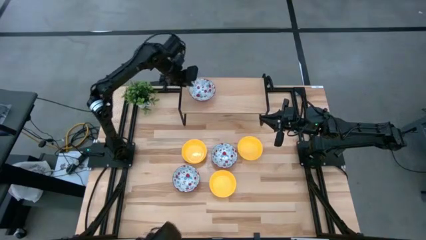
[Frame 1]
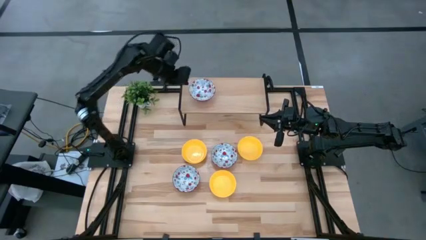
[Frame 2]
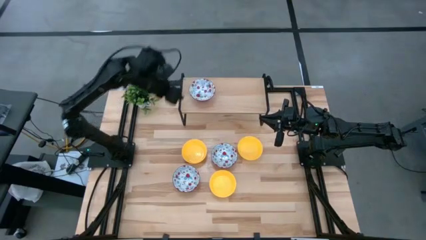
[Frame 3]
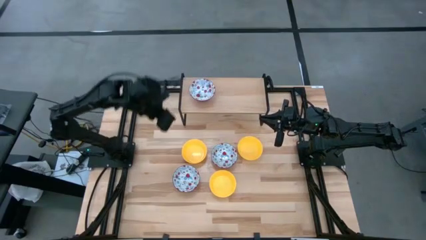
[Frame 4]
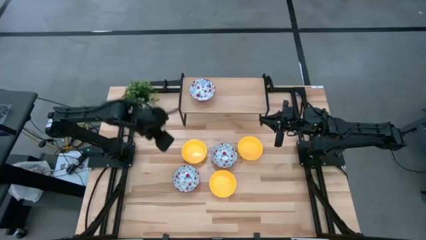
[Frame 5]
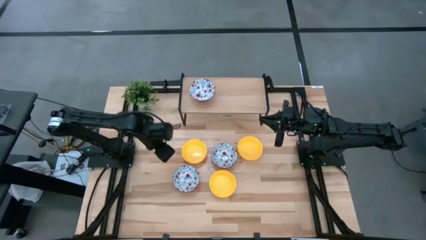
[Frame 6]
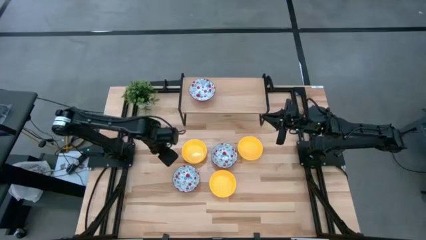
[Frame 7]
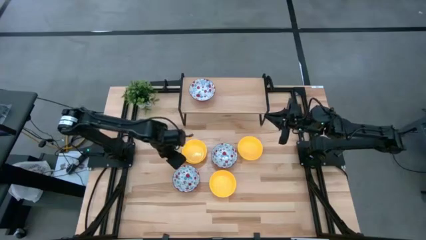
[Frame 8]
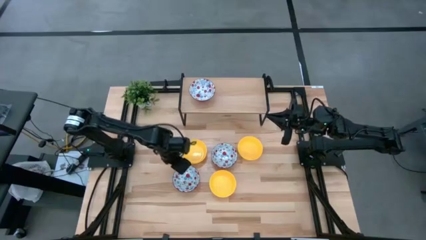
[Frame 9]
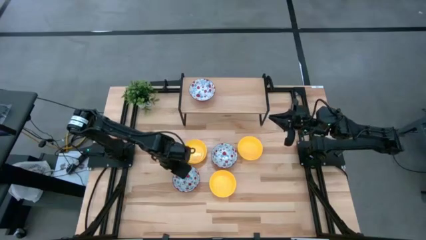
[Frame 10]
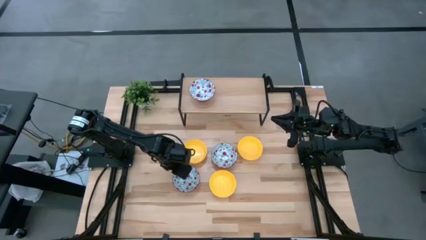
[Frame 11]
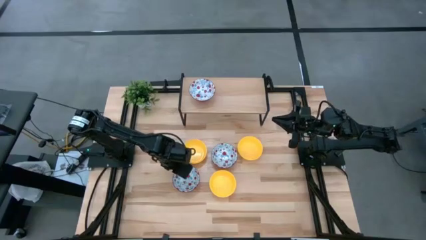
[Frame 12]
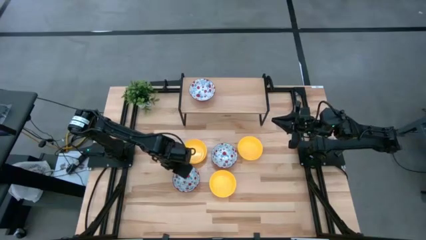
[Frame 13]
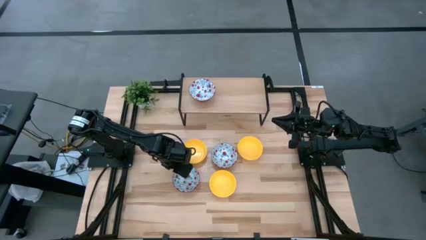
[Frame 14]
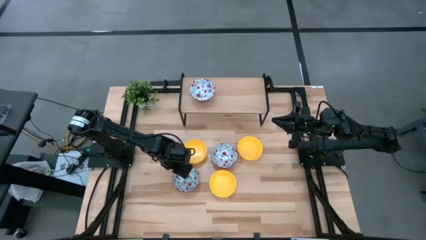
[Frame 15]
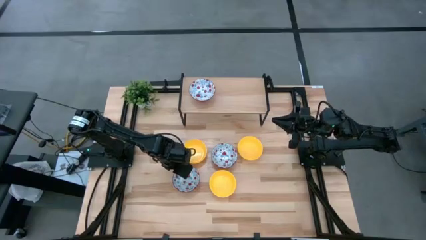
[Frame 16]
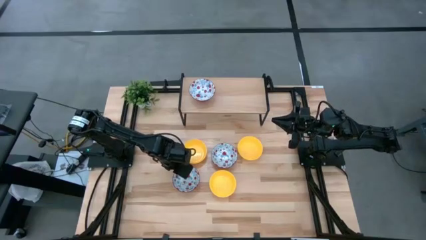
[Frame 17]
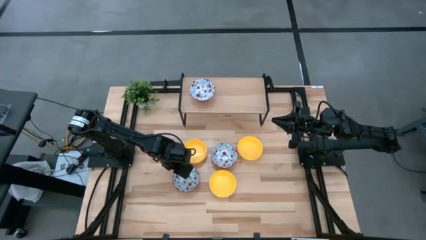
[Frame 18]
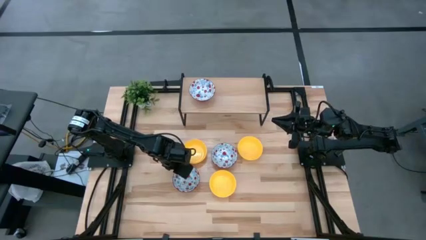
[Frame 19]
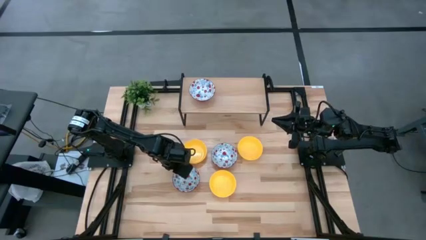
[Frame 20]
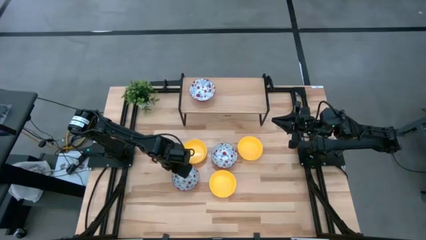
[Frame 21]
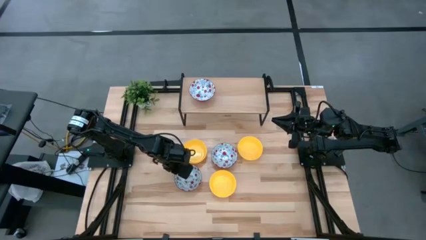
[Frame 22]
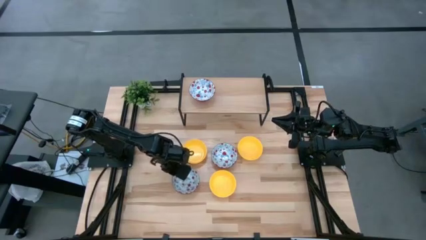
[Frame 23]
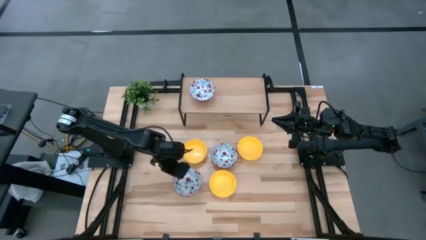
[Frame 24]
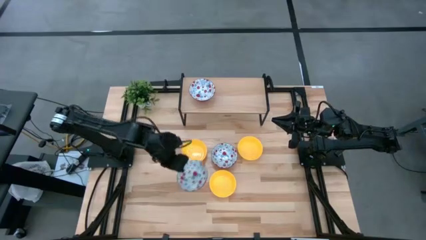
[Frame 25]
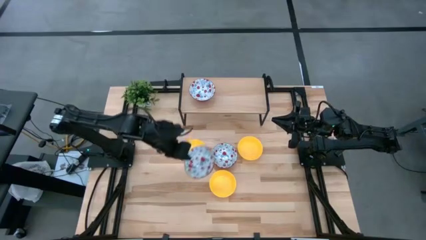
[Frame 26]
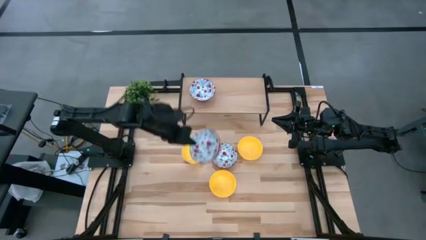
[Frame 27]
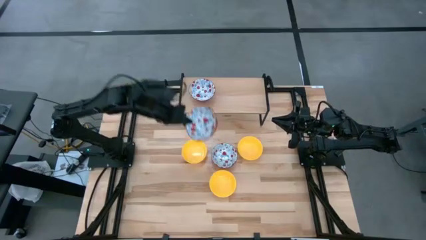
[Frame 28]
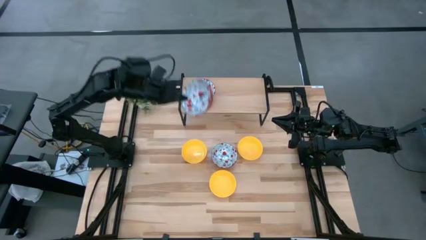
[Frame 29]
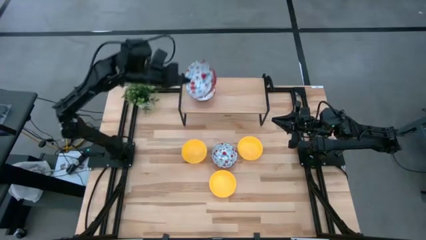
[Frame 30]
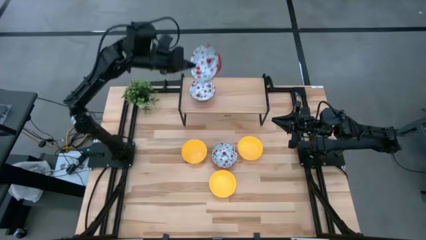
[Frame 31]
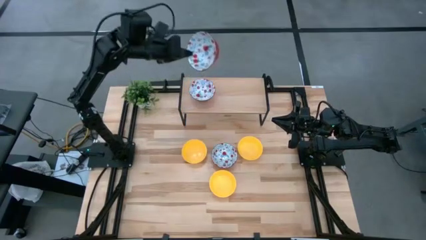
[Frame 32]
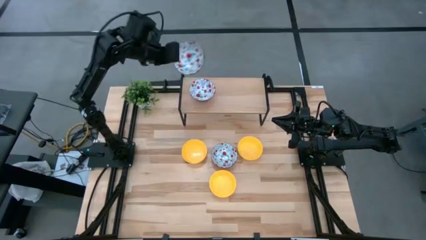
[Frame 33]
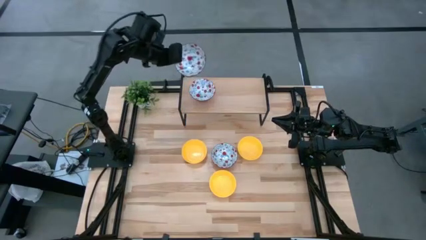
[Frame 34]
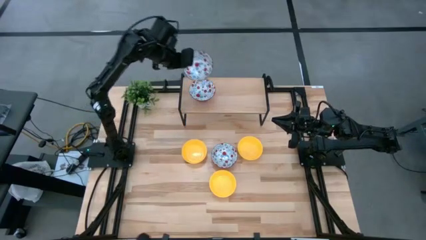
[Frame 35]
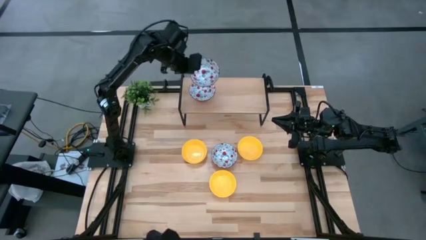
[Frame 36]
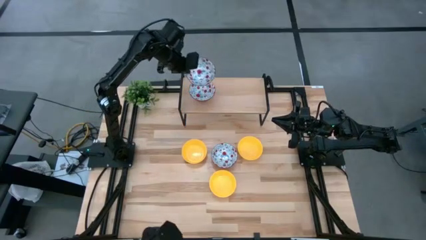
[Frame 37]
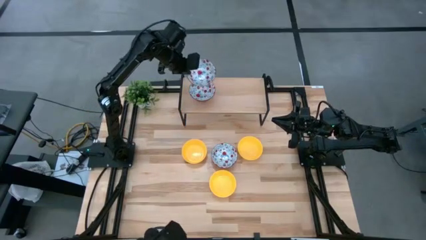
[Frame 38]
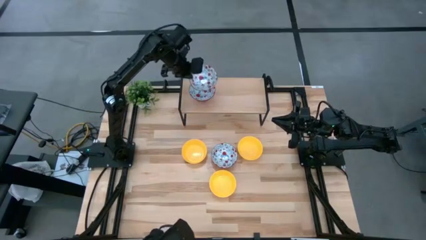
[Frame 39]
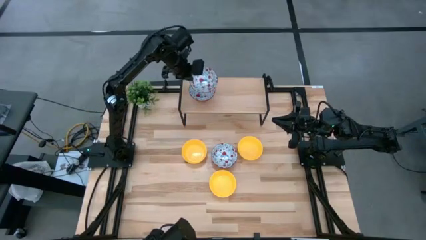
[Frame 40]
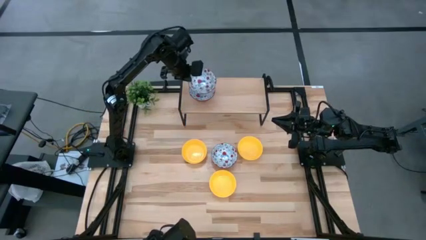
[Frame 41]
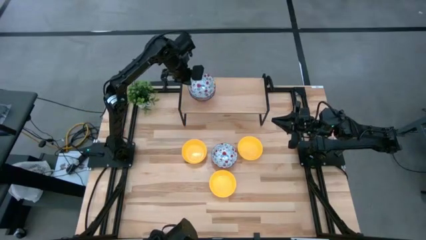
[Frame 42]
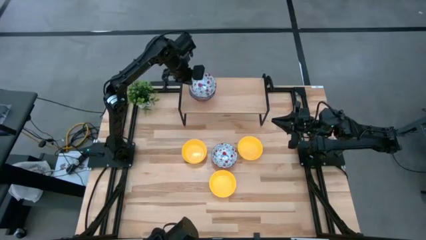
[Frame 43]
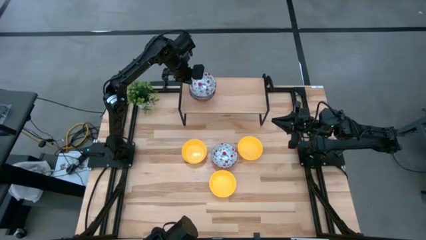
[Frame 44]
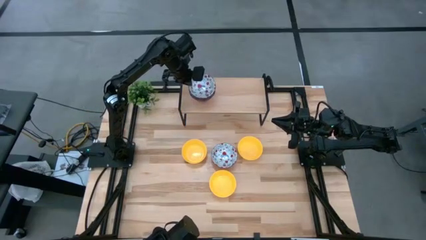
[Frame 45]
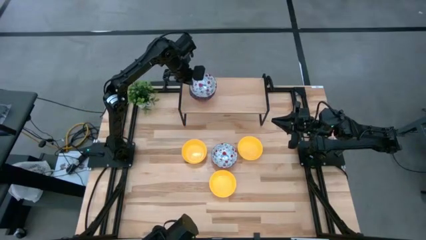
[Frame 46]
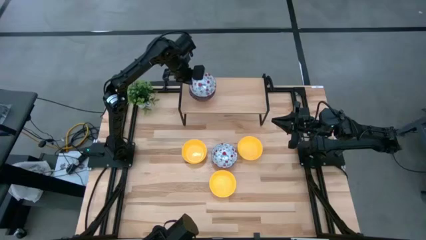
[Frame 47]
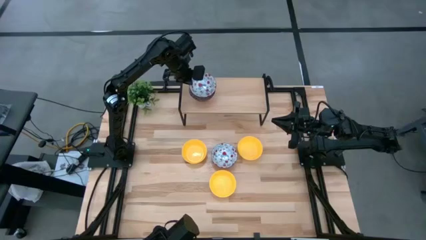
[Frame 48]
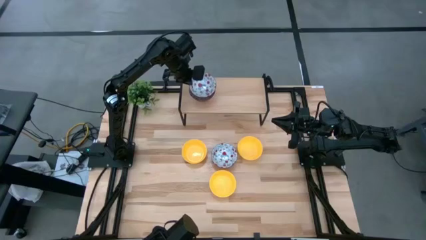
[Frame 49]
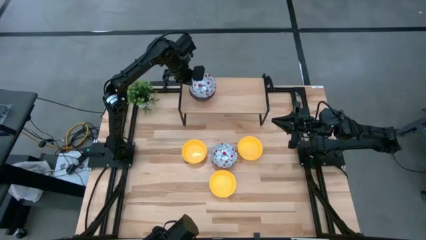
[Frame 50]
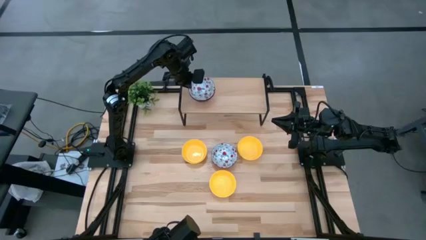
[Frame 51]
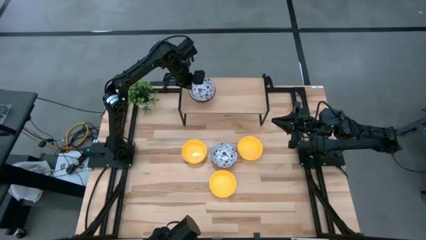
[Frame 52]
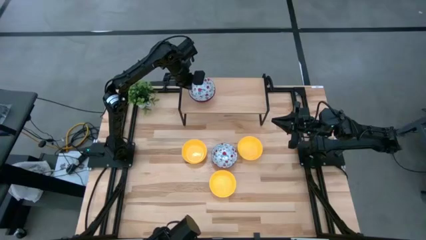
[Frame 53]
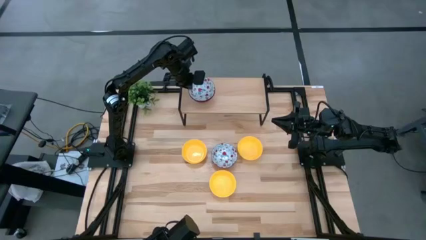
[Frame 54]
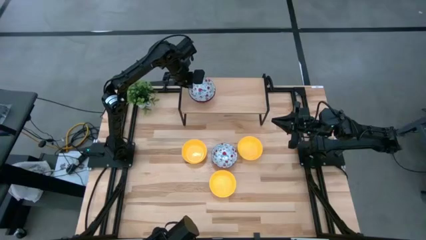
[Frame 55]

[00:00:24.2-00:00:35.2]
Task: Pick & Place Mini bowls
Stack the bottom white bowl on the white bowl on the shelf
